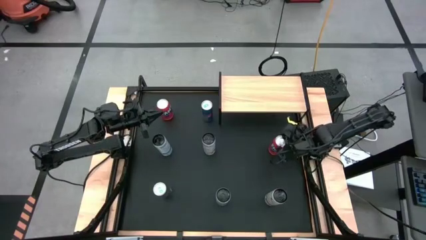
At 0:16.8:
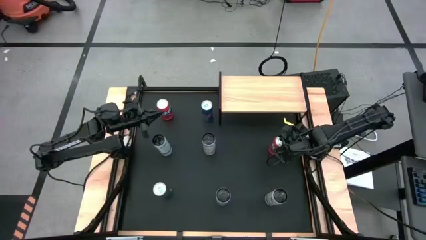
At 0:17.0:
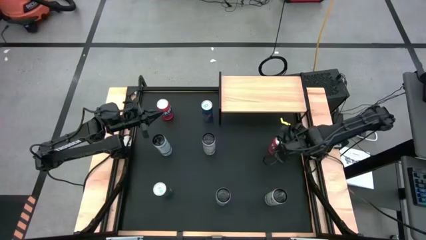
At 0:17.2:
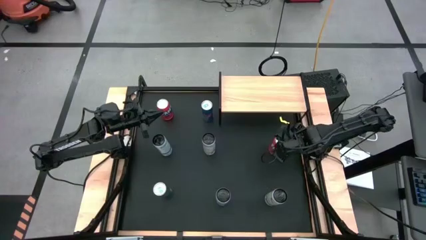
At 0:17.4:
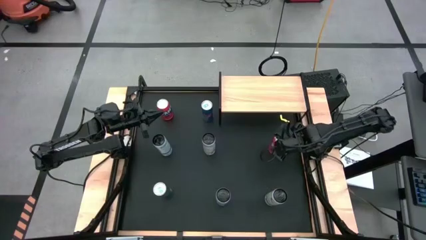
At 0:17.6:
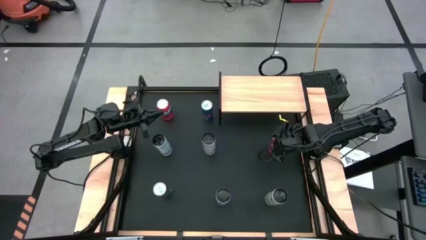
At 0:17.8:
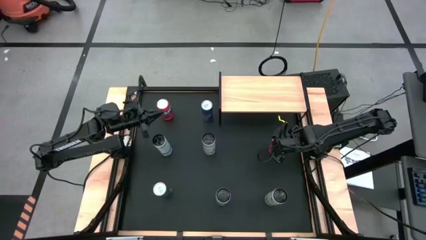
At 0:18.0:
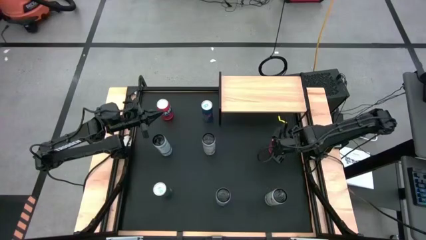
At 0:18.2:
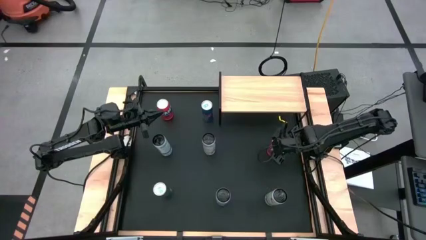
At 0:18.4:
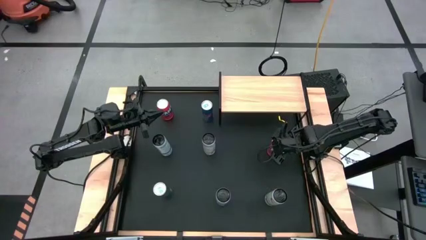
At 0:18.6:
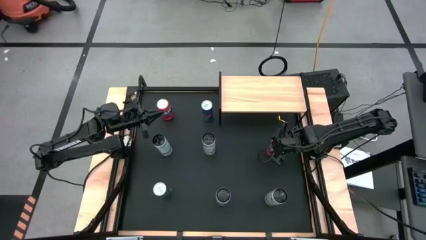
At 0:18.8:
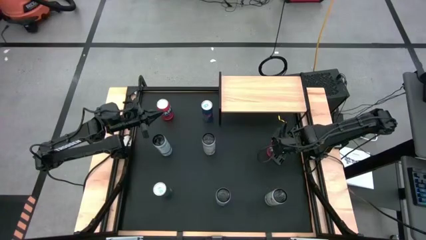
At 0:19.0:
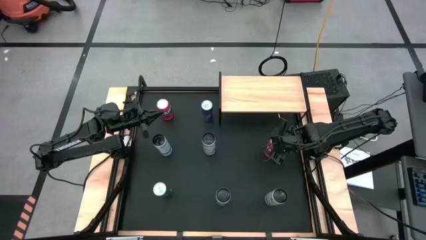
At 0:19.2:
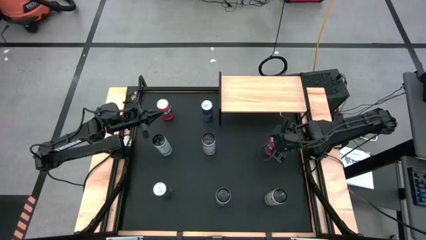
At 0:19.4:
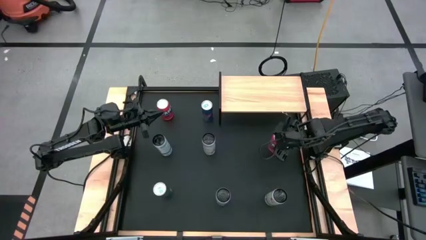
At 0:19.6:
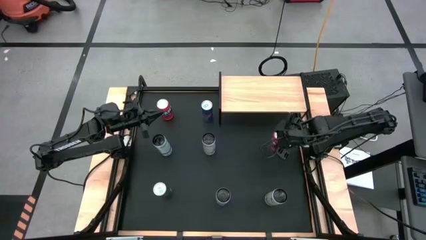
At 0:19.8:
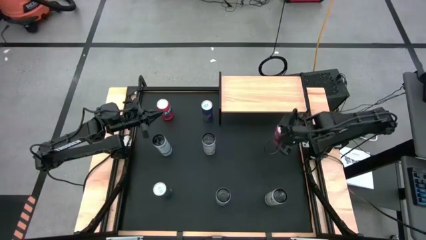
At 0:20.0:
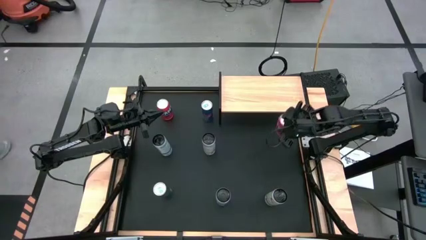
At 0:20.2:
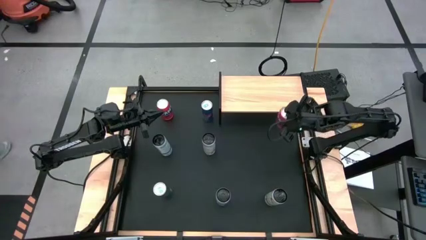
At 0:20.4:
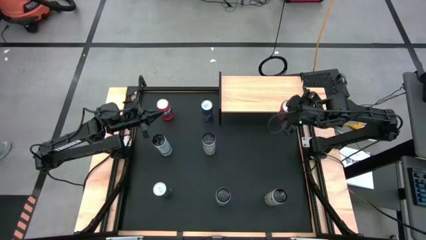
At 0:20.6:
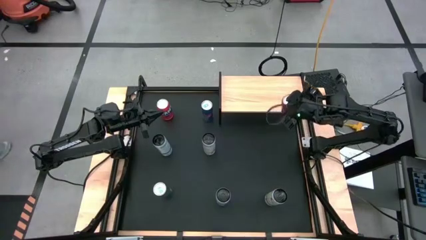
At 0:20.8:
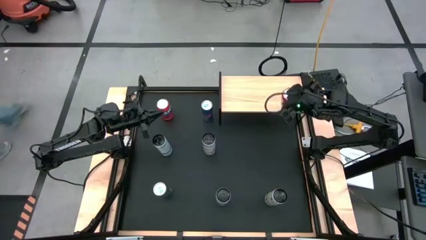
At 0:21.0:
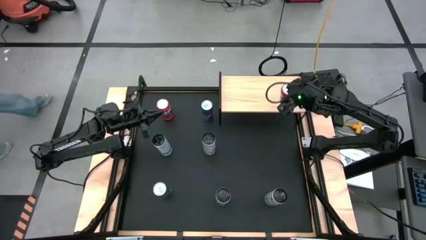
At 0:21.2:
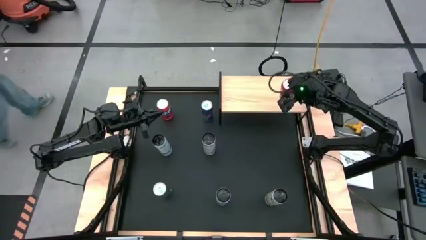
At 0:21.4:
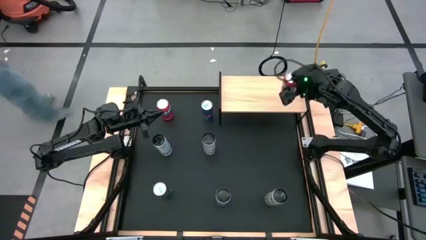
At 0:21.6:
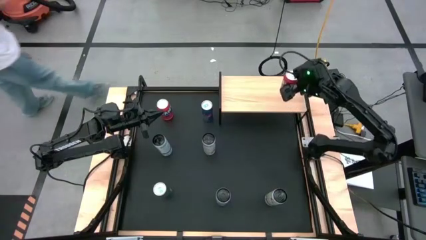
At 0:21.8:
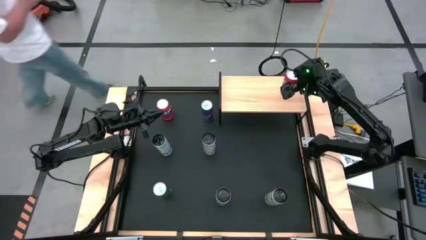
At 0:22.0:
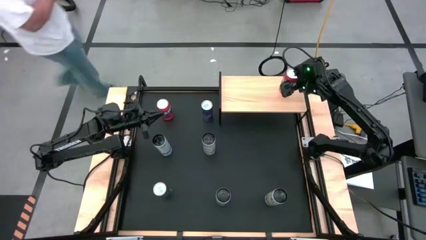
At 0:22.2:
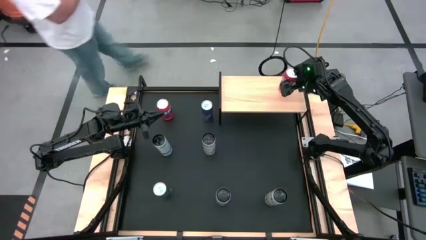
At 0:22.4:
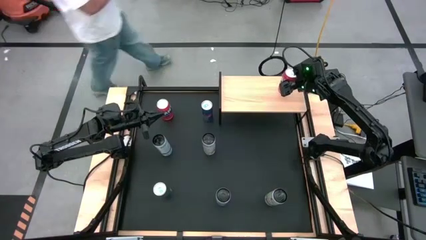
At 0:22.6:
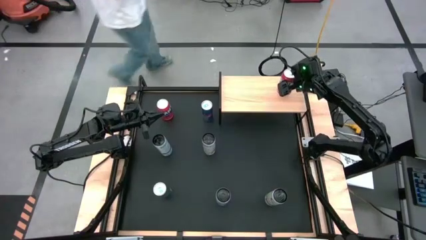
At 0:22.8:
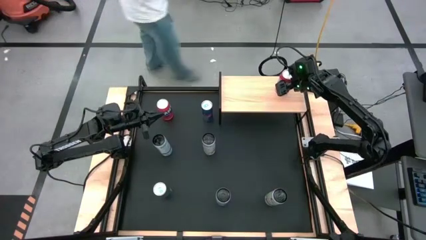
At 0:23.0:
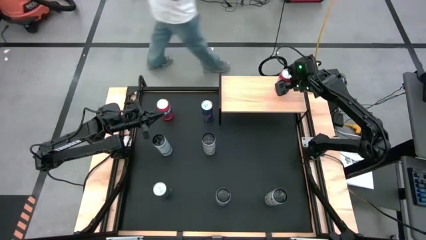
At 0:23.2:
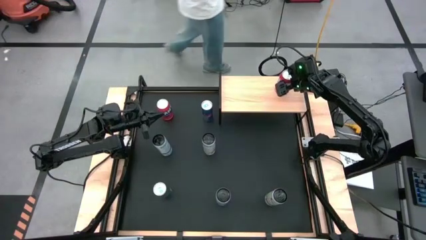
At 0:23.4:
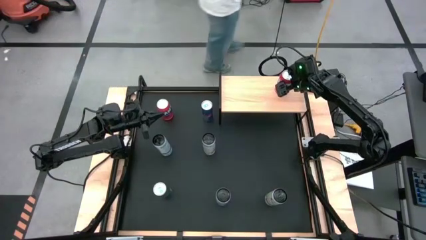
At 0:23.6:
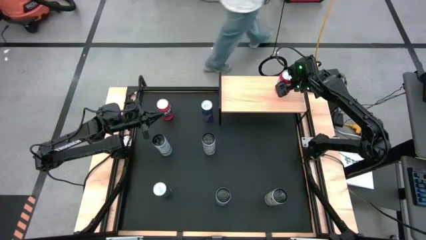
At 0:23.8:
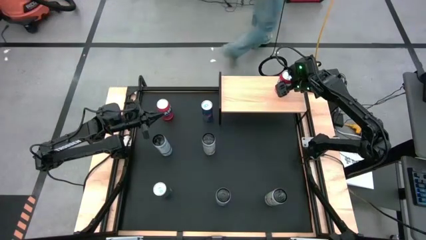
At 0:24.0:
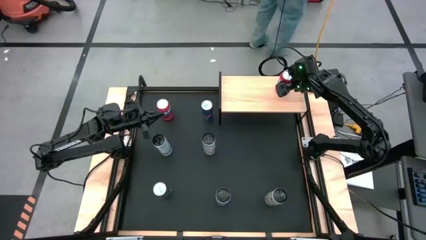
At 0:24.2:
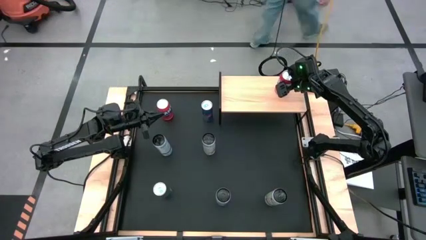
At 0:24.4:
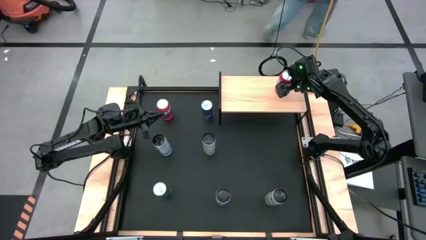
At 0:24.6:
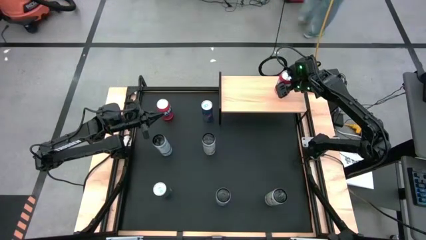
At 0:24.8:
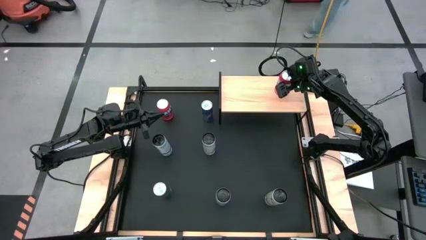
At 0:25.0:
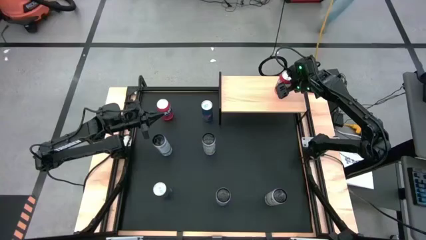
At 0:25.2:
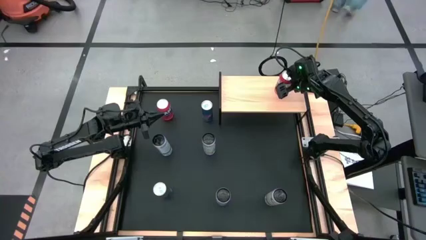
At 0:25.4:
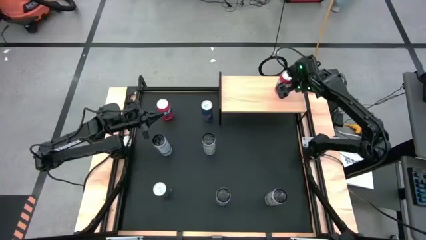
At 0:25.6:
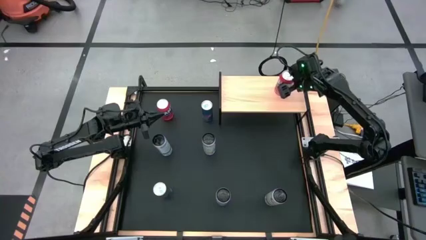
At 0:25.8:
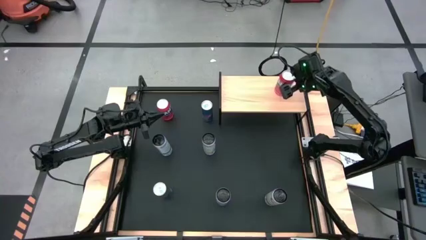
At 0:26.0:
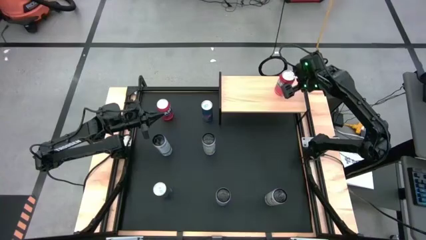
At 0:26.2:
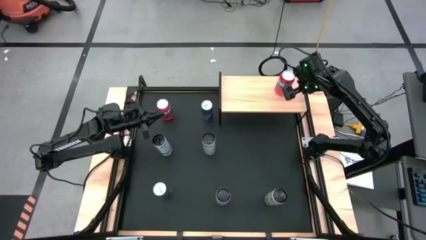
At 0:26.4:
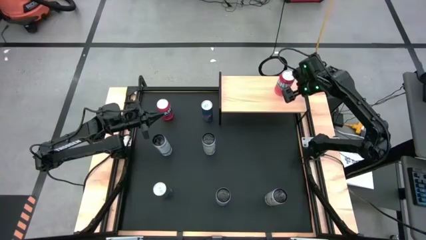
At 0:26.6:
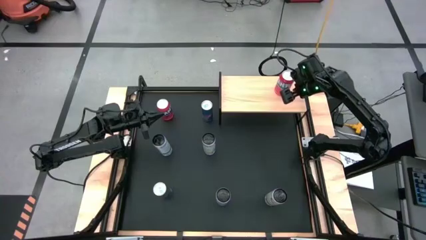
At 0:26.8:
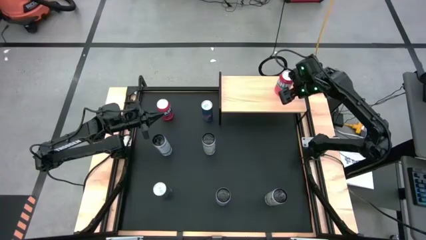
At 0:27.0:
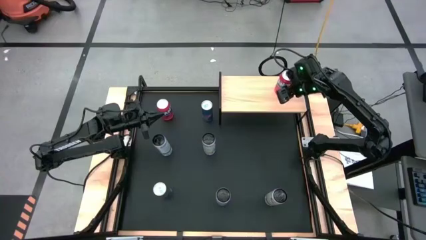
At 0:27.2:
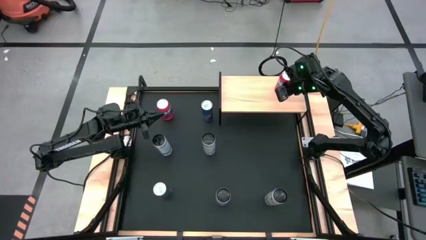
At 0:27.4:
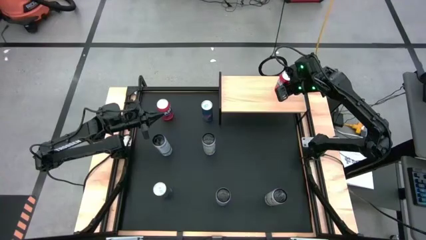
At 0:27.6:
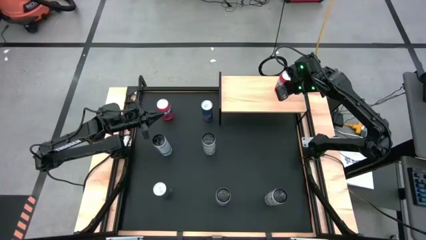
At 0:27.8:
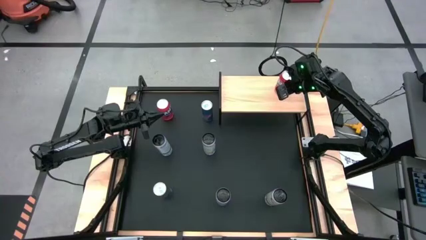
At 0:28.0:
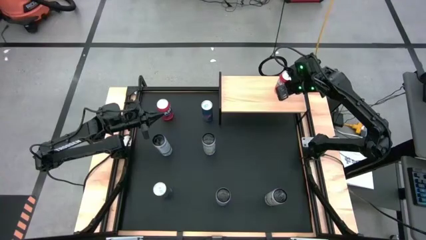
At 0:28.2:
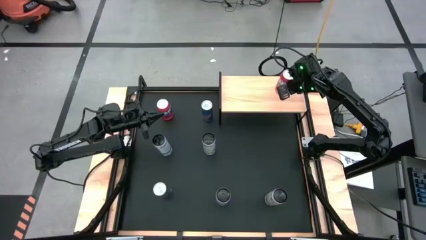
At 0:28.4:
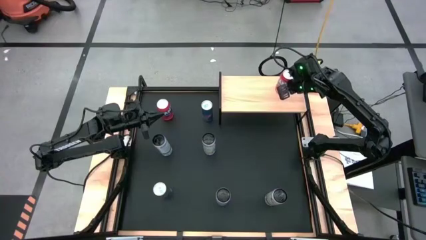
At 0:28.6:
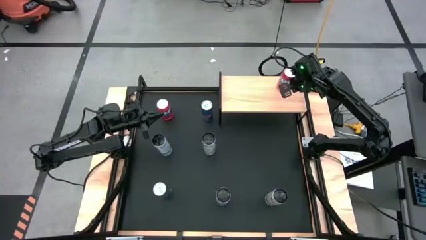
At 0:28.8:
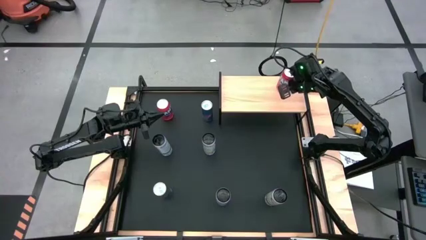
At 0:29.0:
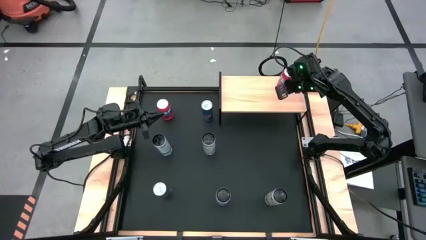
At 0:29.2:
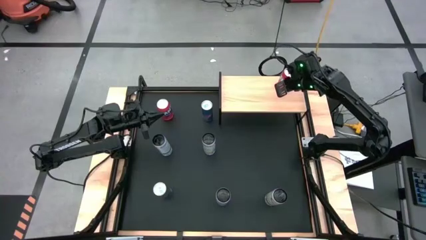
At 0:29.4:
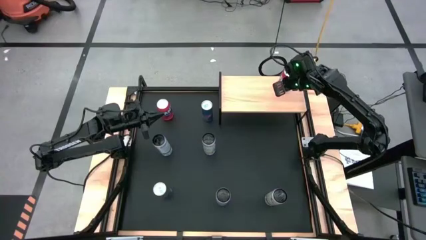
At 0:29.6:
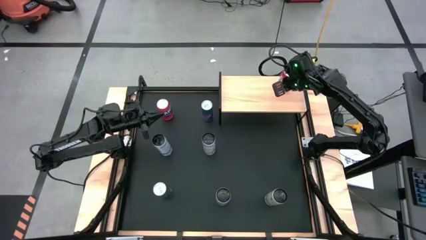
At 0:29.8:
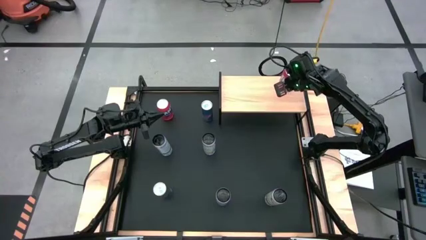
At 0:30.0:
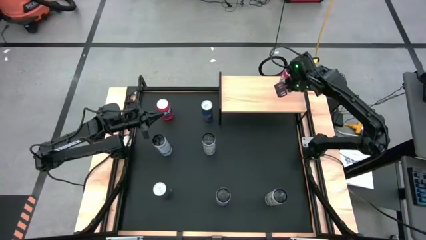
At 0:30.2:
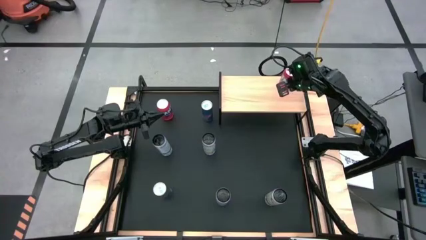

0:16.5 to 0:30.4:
Task: Place canned beverage on shelf
Put the right red soda can on the shelf
